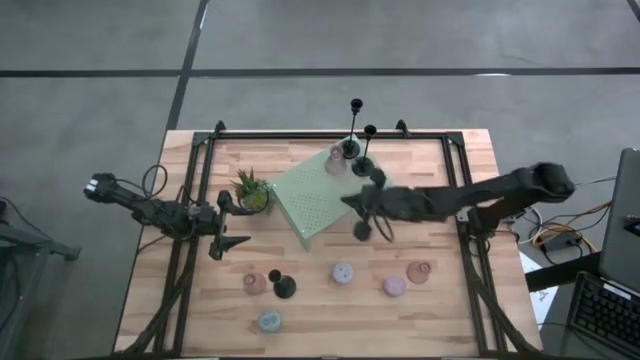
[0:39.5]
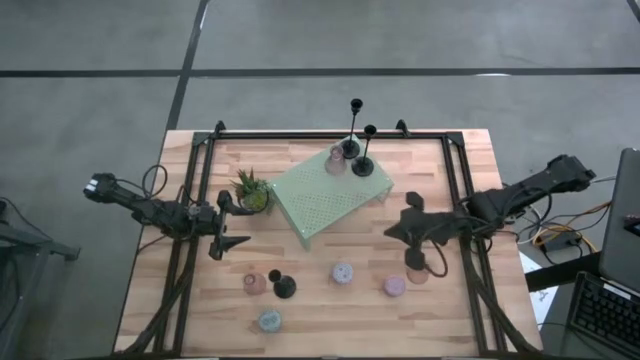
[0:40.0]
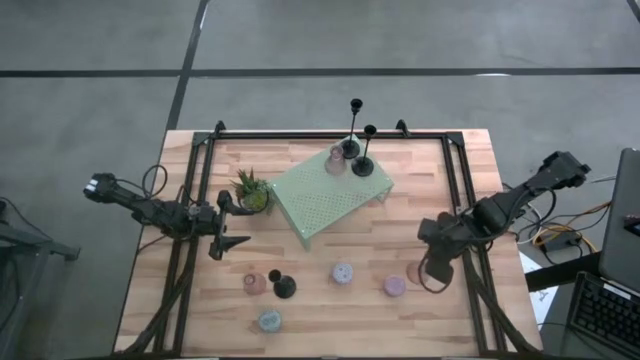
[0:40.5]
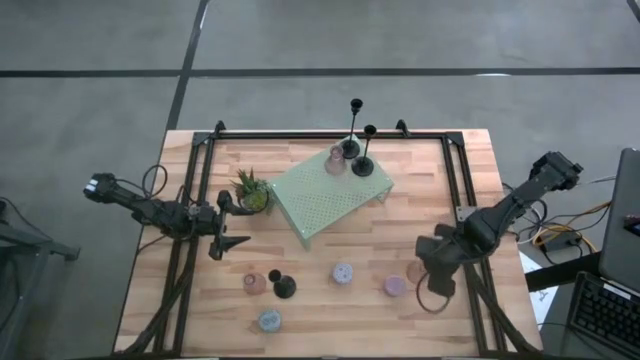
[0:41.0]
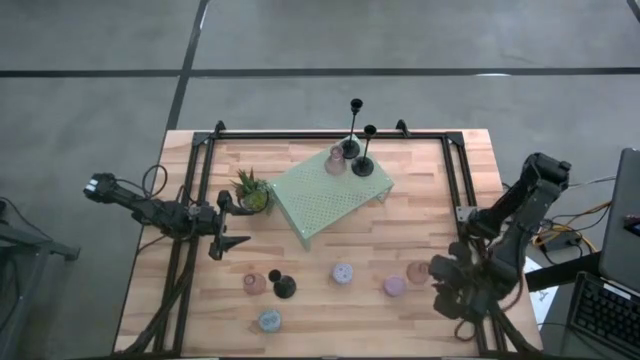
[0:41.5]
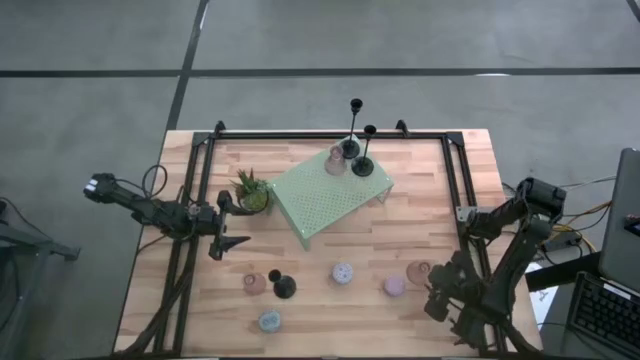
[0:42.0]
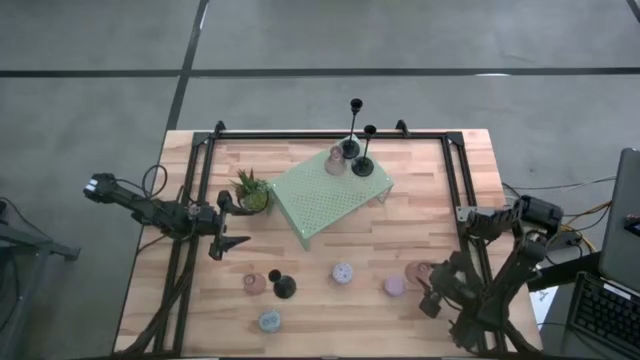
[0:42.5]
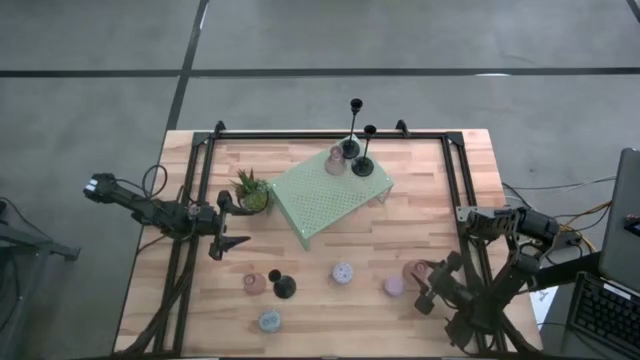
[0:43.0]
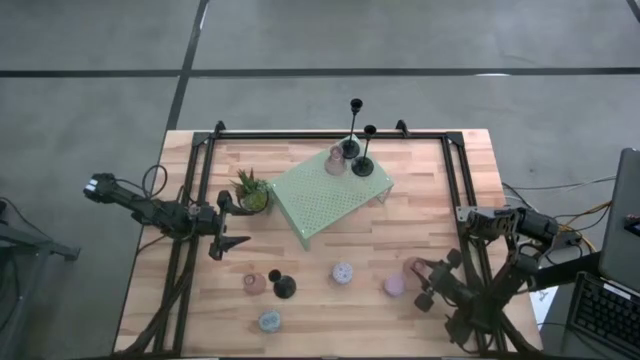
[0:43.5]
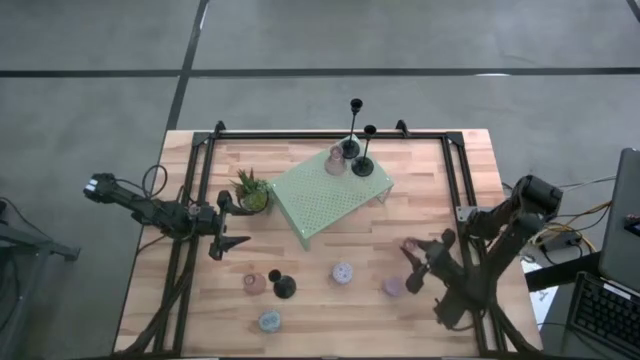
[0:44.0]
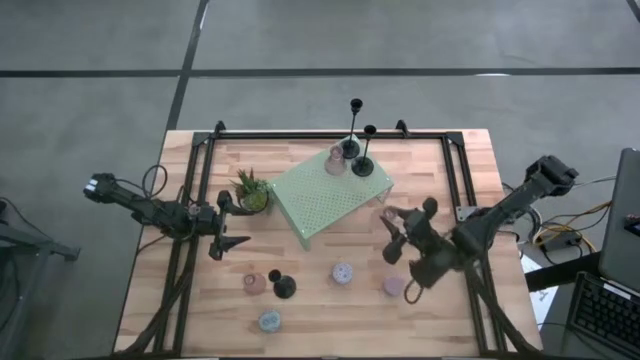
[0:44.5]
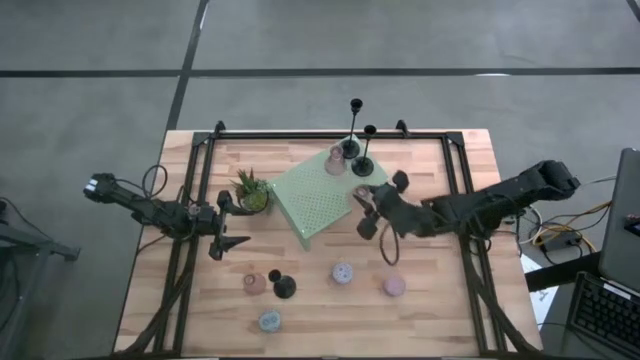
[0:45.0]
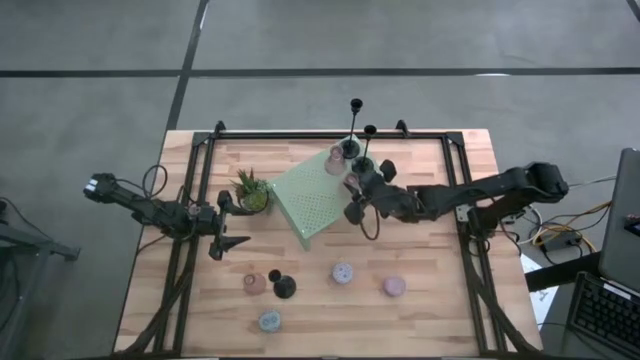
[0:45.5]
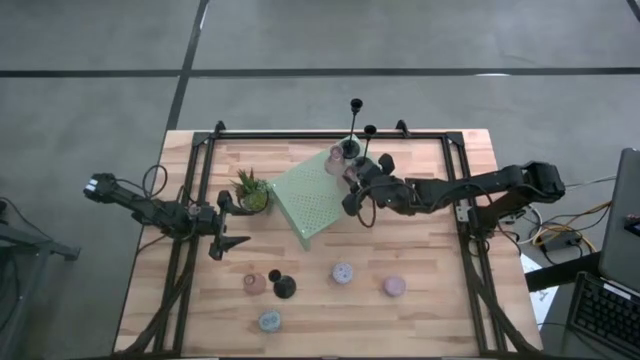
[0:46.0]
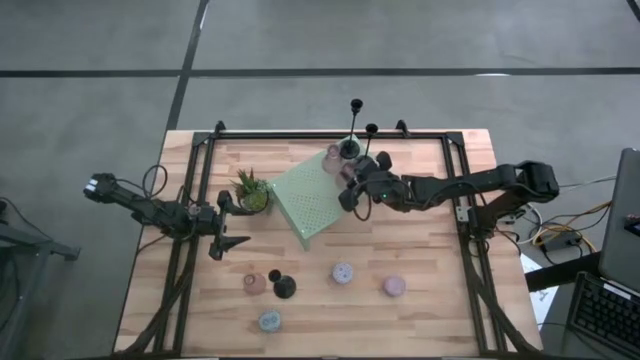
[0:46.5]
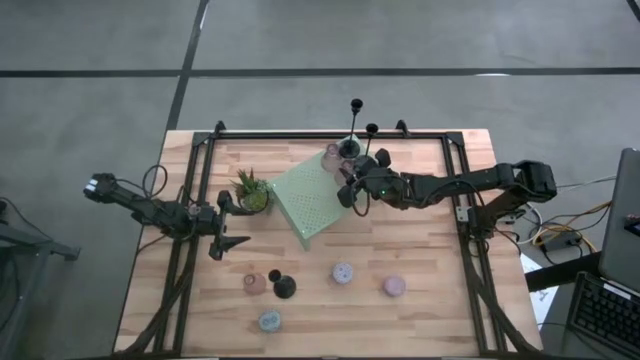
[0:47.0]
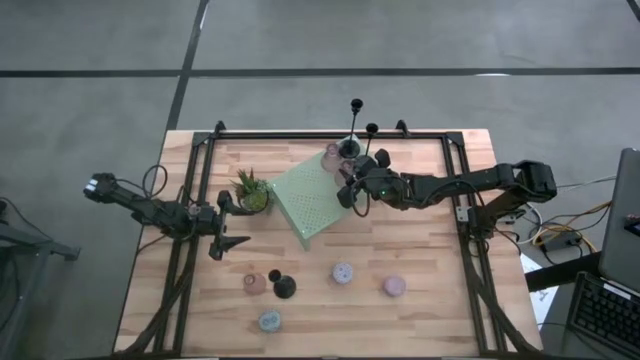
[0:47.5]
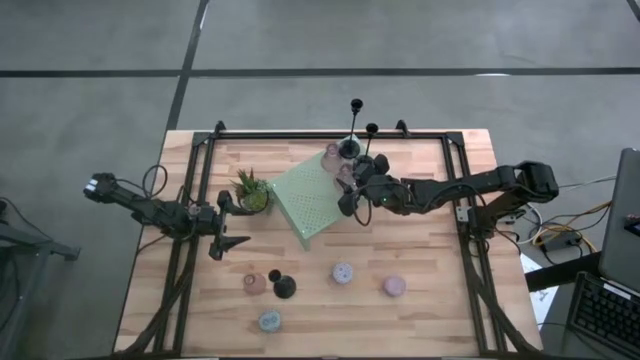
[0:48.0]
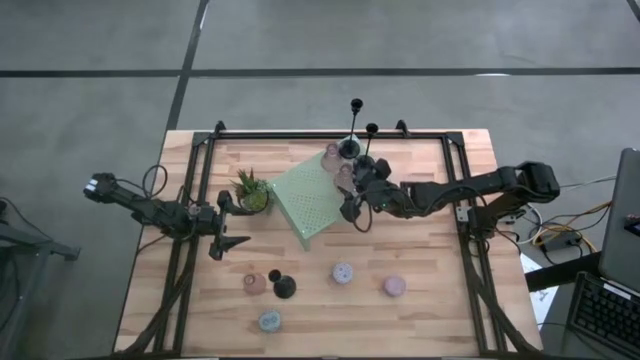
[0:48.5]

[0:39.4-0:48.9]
Task: Pick & Place candle stick holders
Put the right pink glass candle holder on the shelf aligned with the other pink glass candle holder

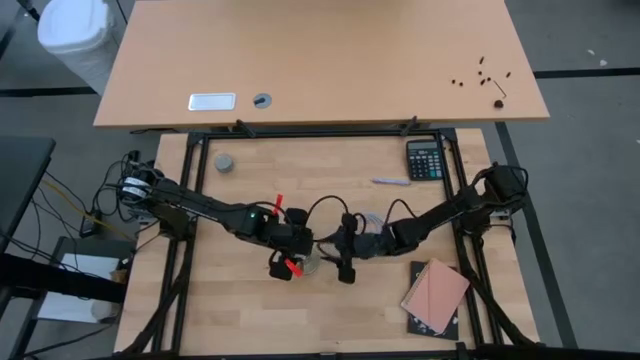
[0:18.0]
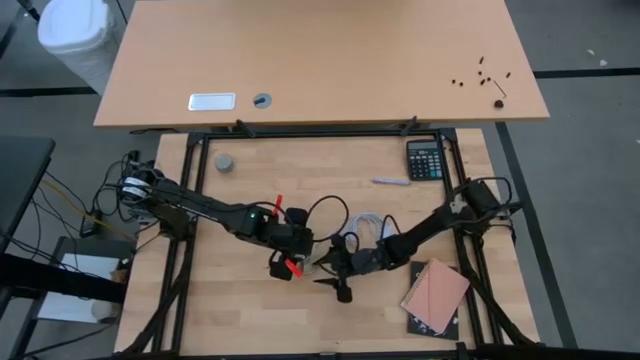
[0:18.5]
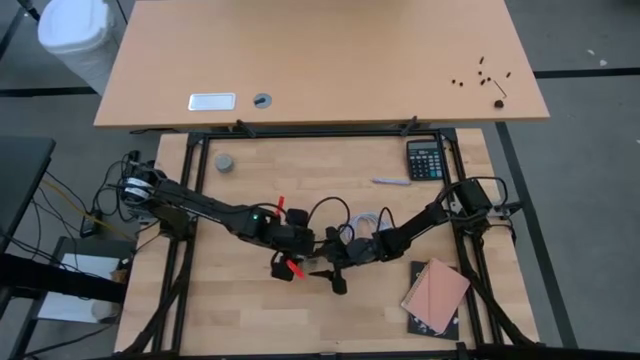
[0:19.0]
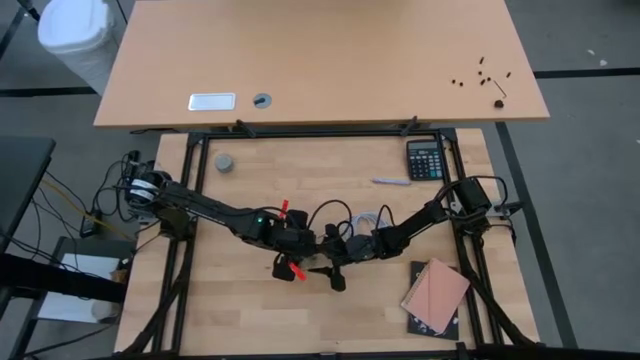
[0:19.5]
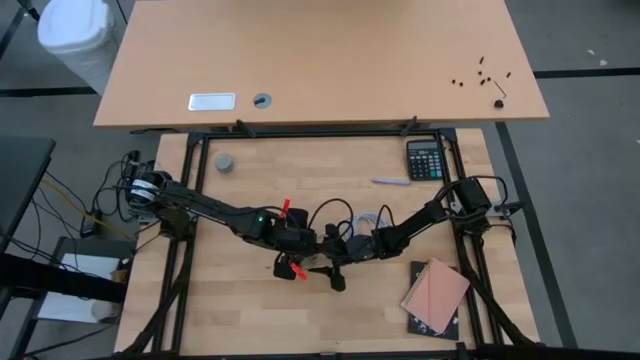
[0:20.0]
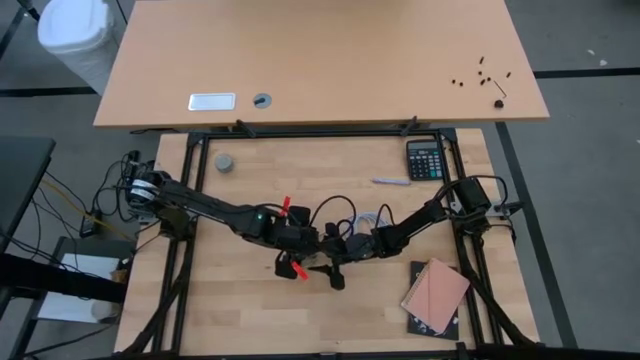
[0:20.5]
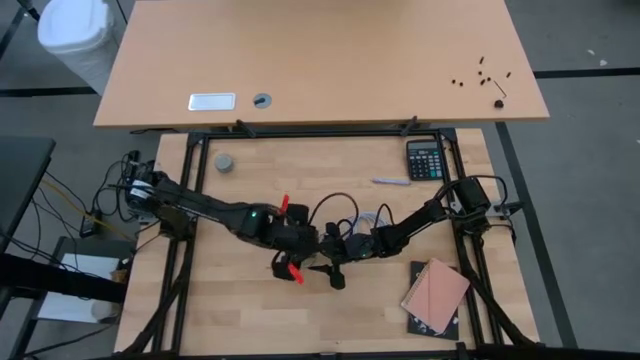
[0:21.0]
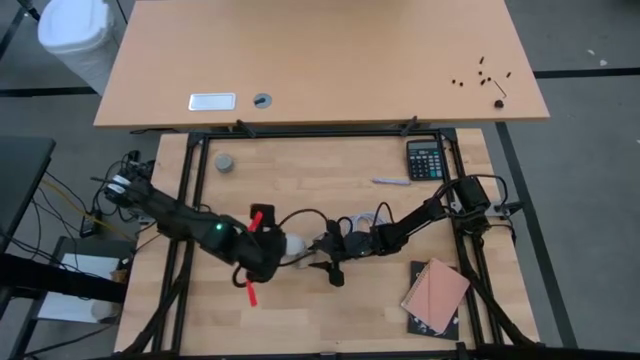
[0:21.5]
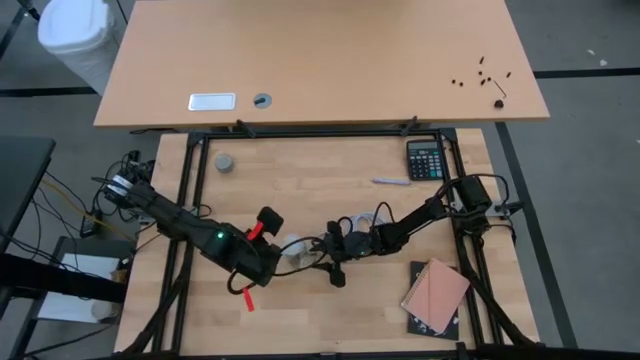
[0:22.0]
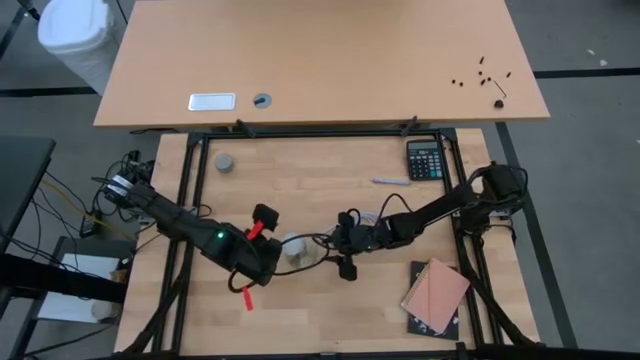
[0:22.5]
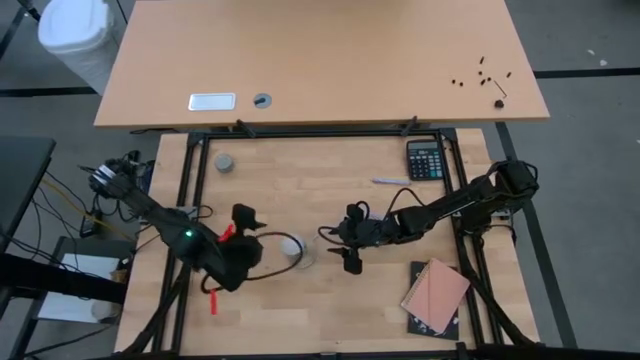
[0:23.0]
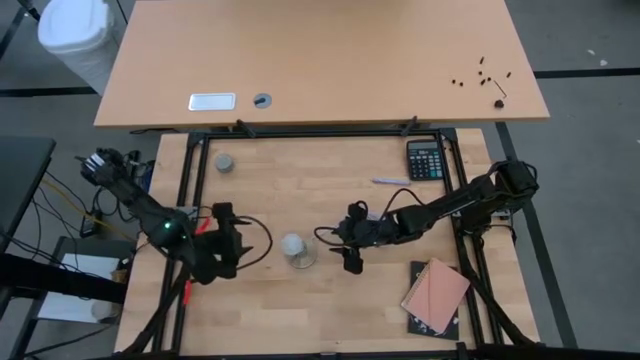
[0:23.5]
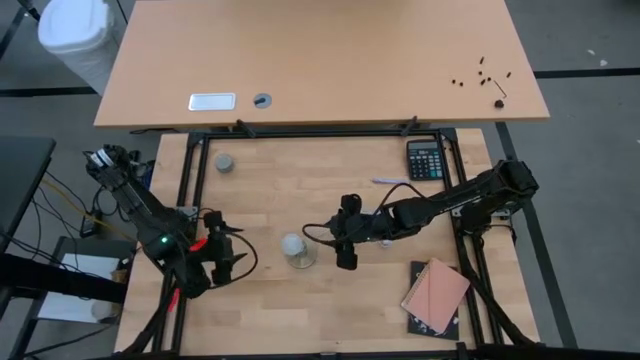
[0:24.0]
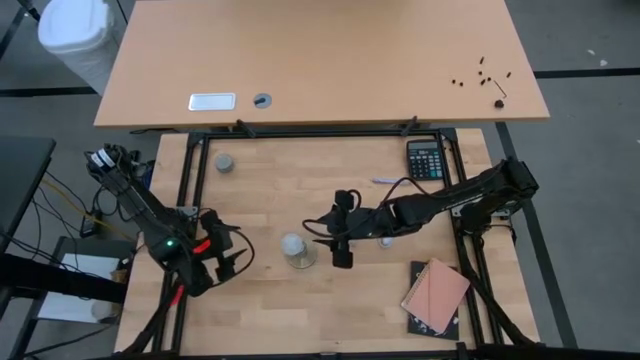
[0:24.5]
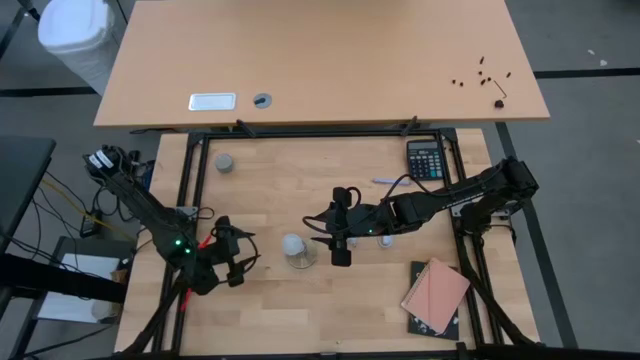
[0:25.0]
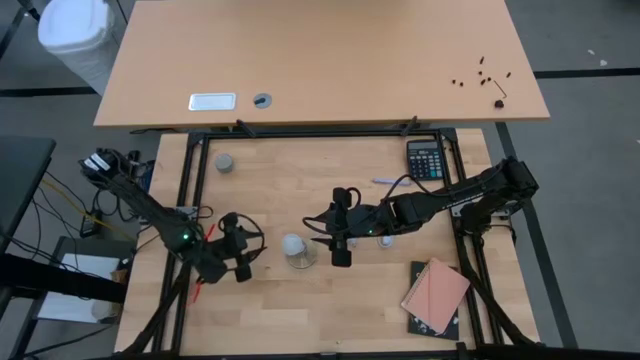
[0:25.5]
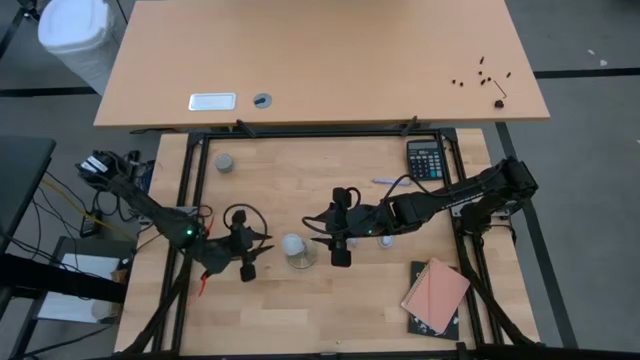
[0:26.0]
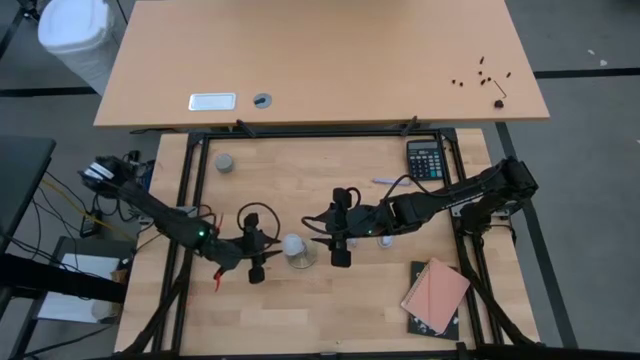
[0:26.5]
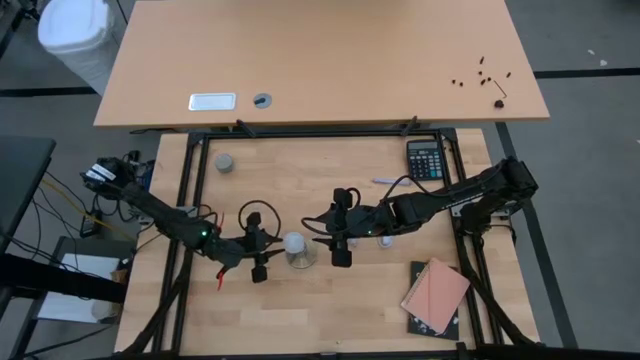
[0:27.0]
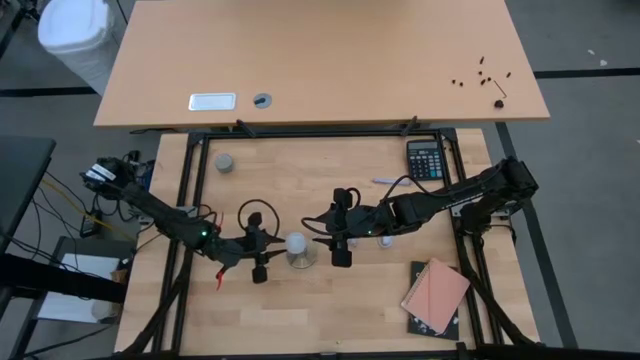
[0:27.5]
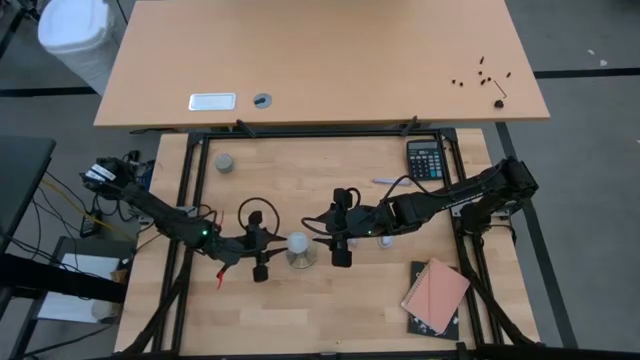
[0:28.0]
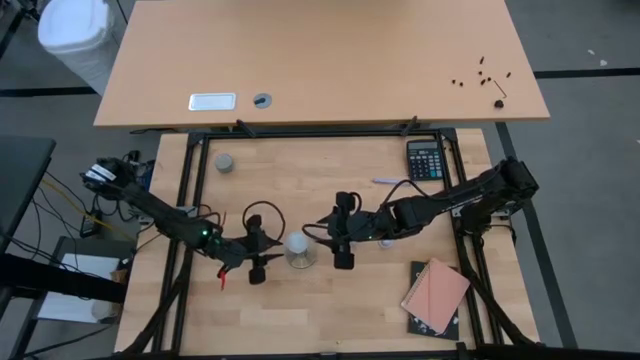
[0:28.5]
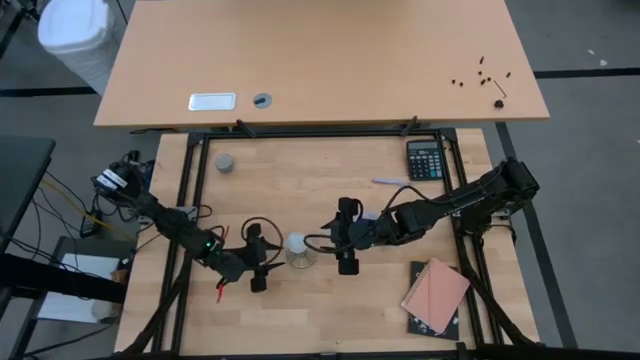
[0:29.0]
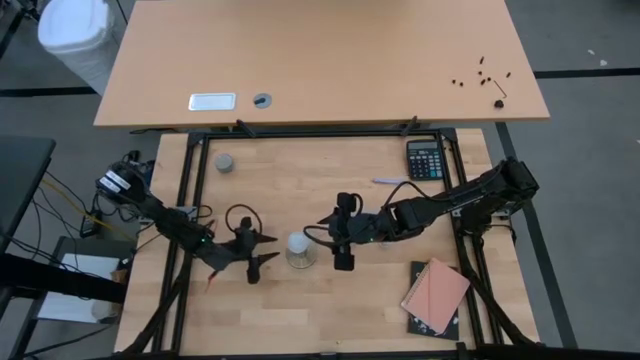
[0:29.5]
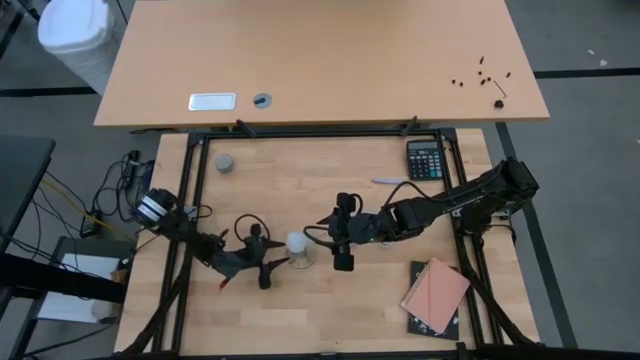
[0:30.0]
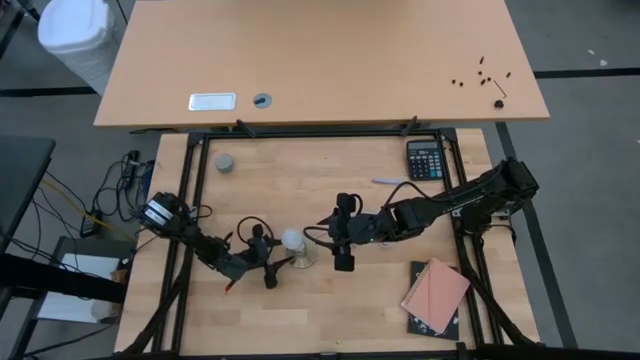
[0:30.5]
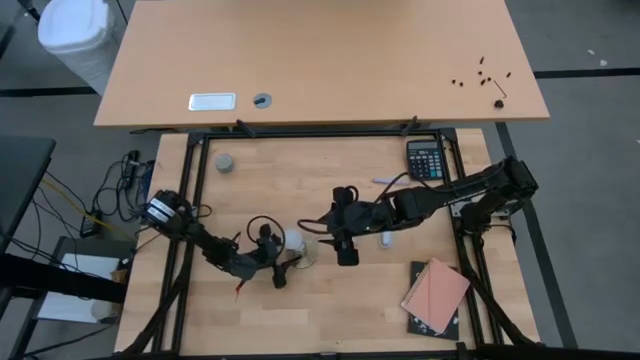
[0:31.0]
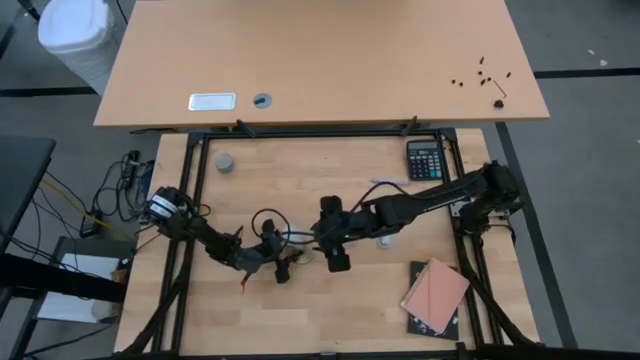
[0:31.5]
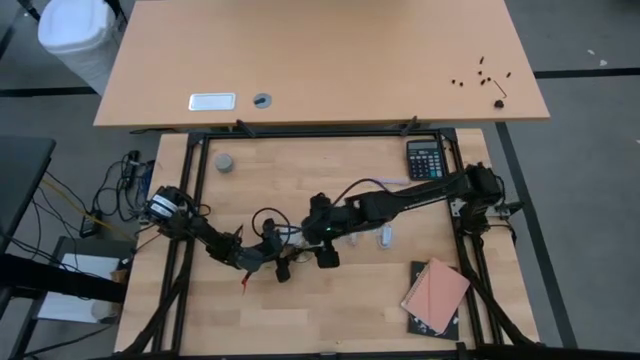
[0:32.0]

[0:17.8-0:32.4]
Task: Screw lightbulb
Insert the lightbulb into the bronze lamp socket
